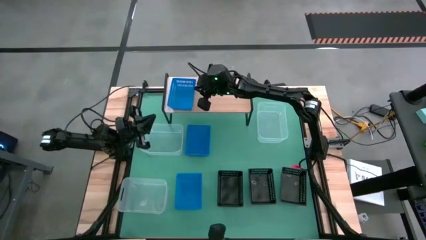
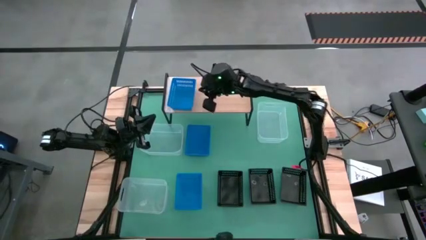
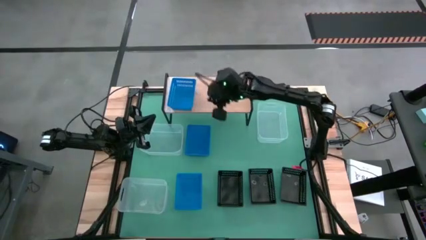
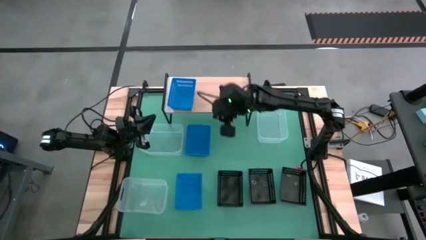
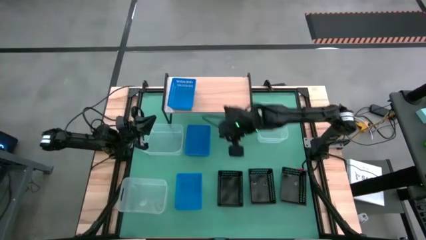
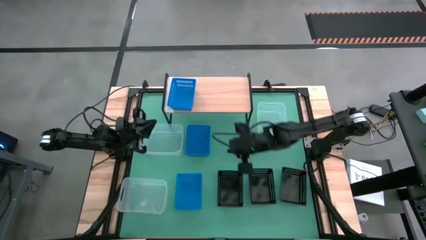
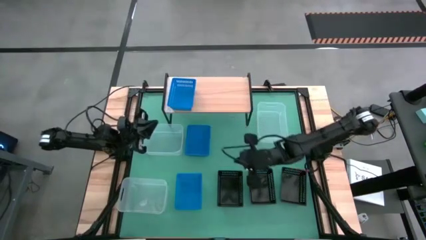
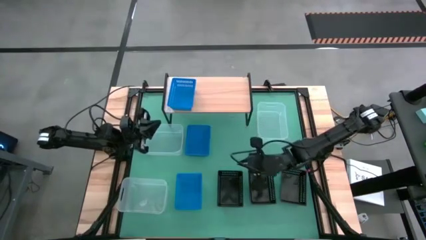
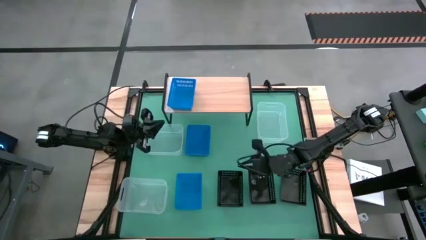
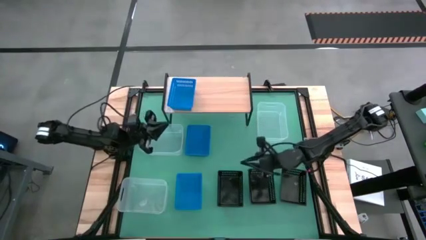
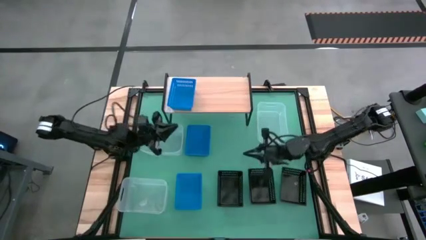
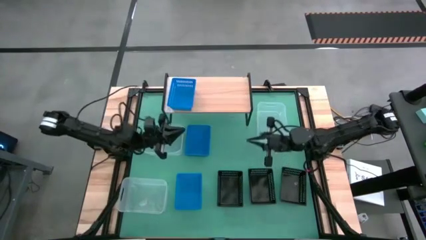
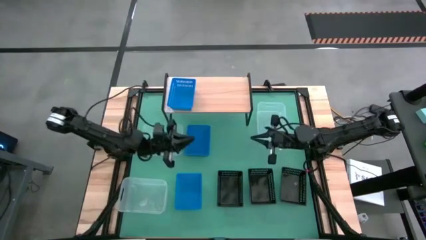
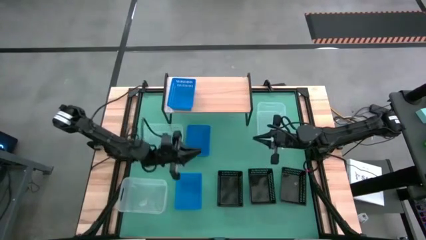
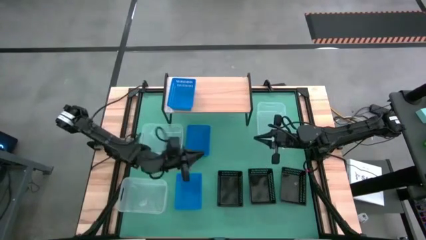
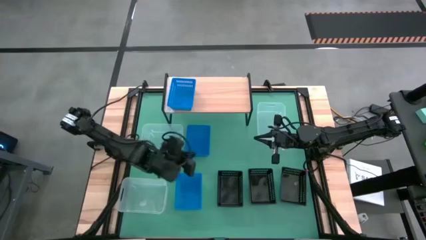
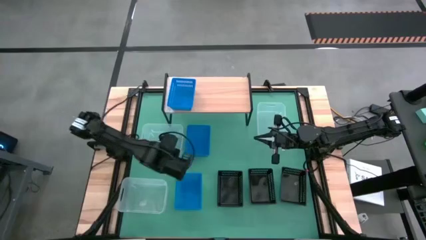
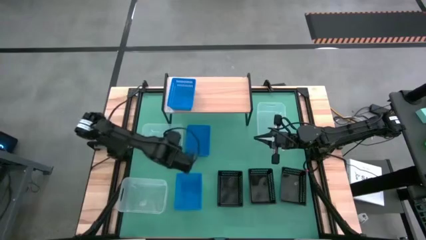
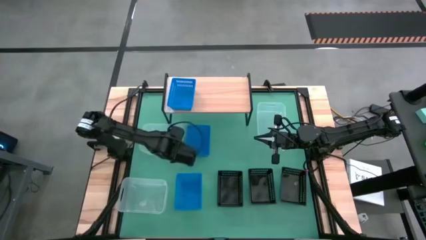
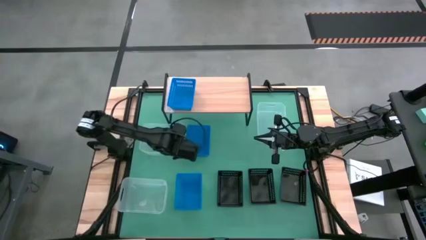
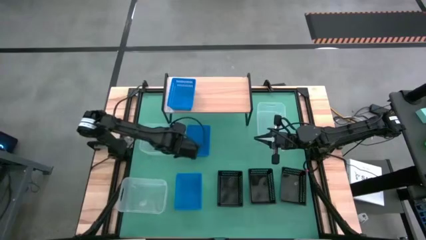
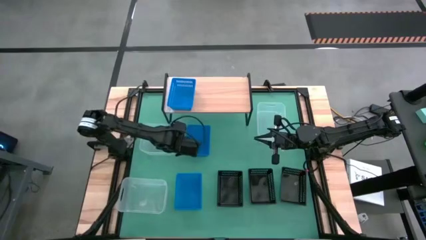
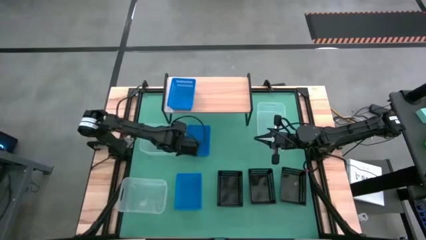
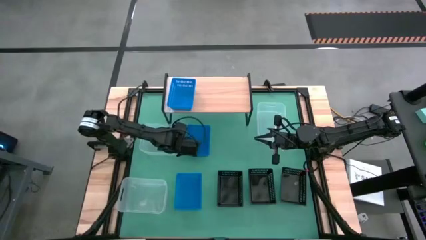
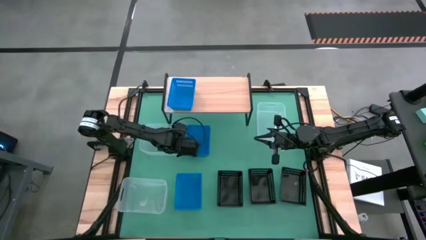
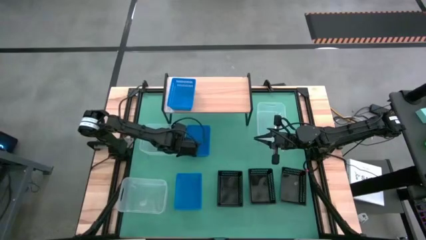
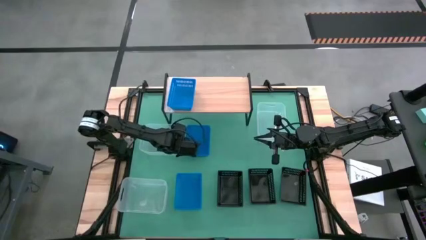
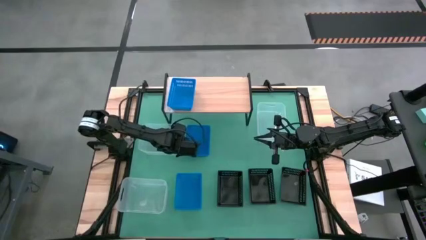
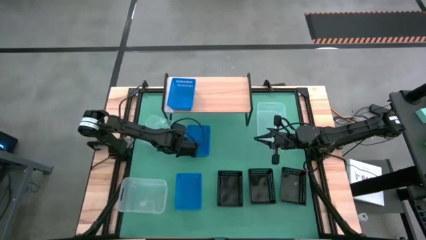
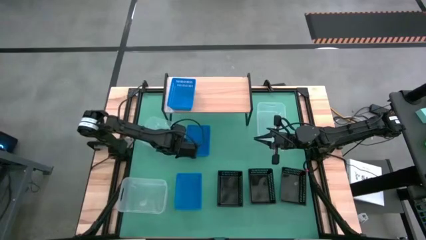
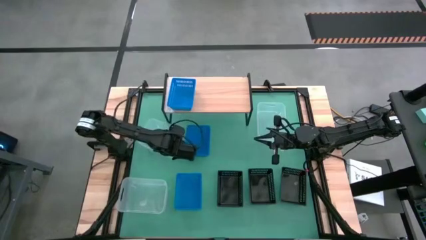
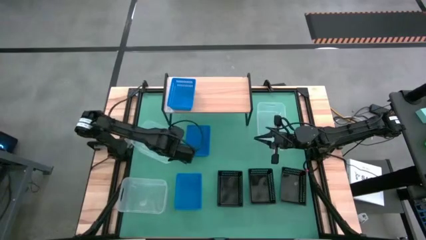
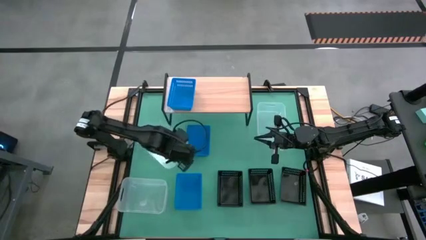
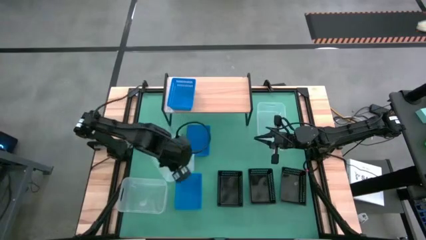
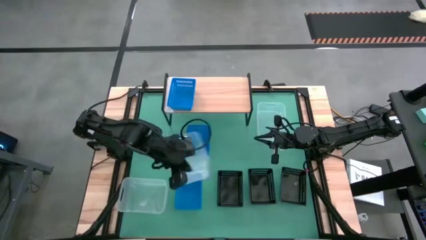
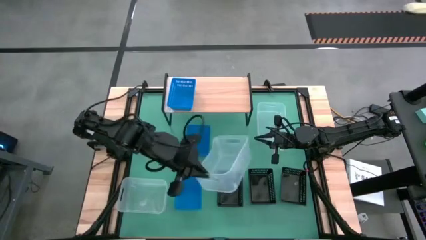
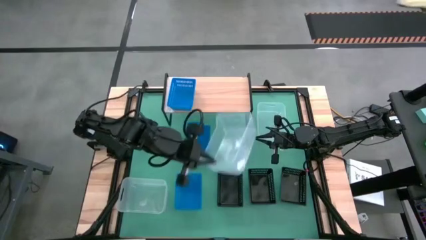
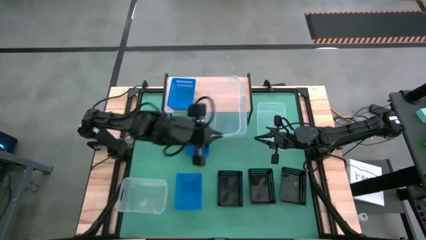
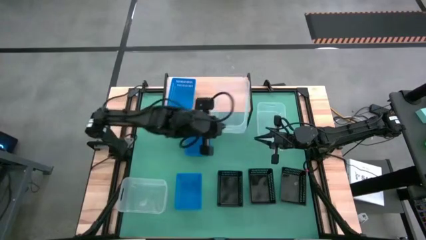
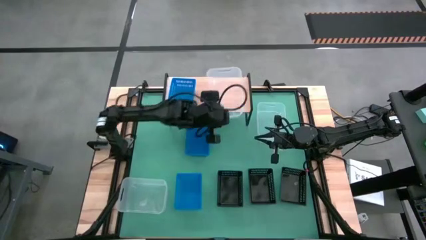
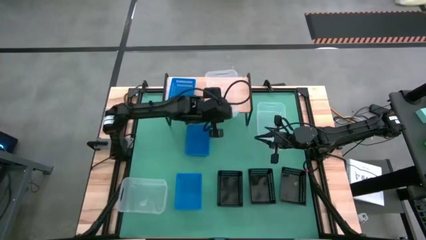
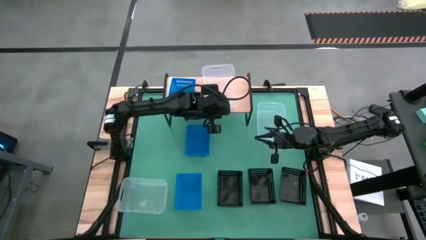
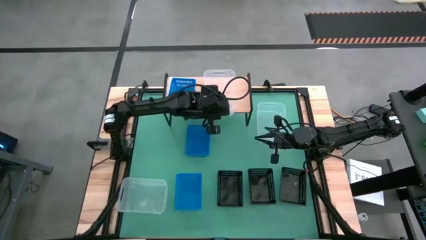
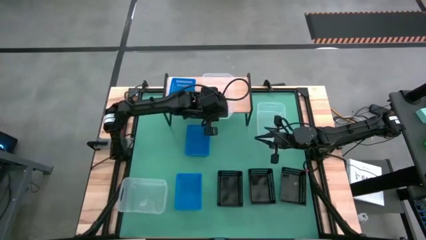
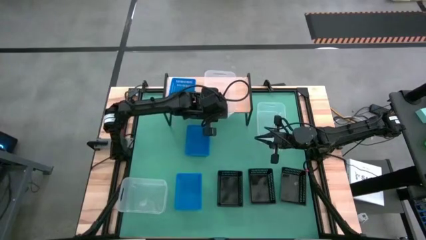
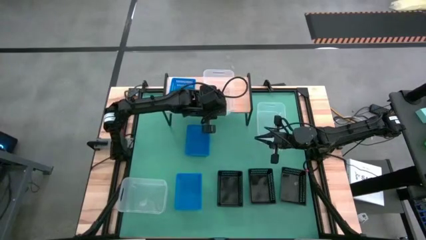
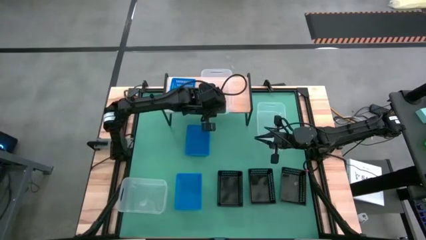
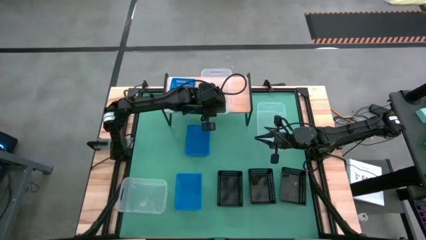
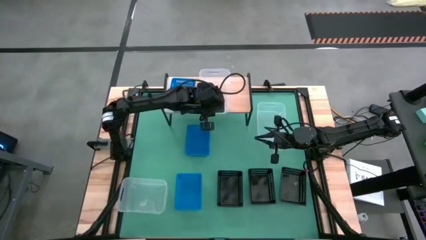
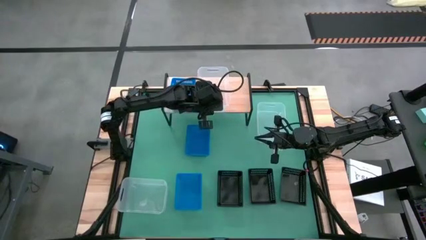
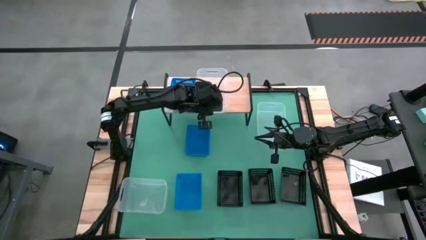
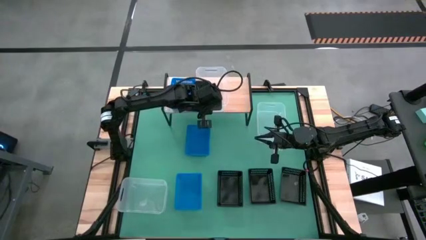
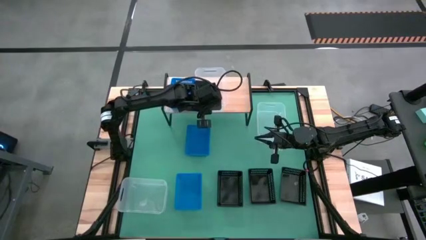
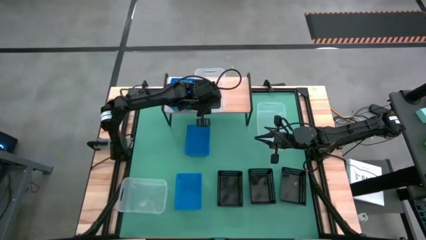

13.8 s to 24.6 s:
Task: Stack baskets on shelf by color
Put the middle left transparent bin on the shelf

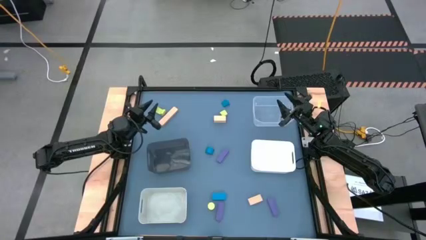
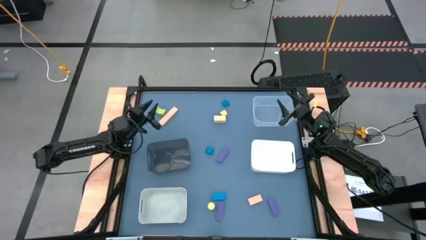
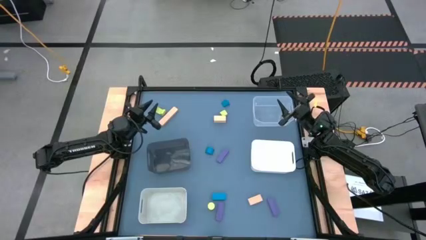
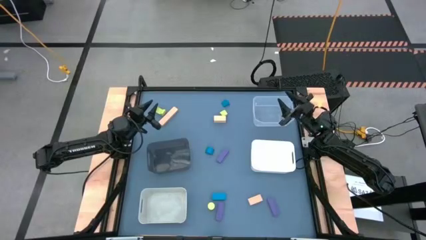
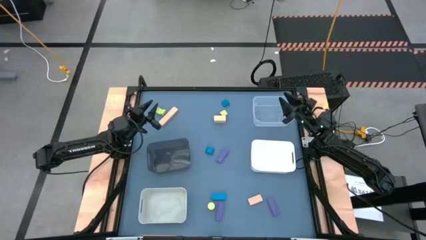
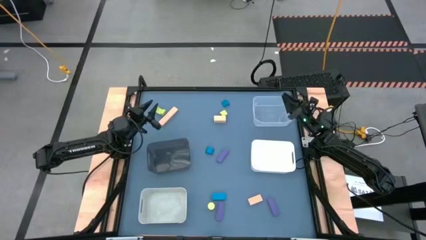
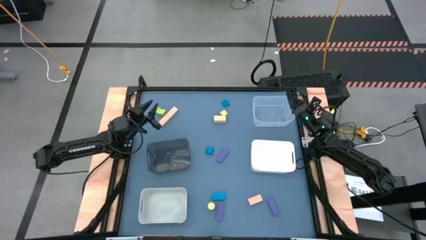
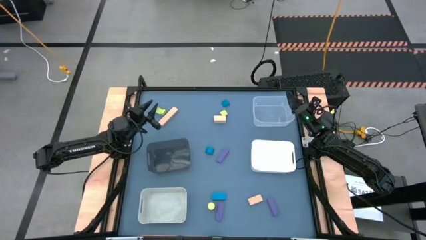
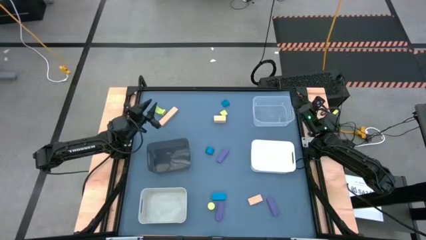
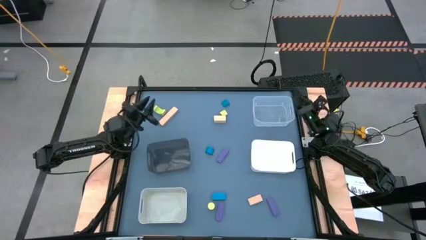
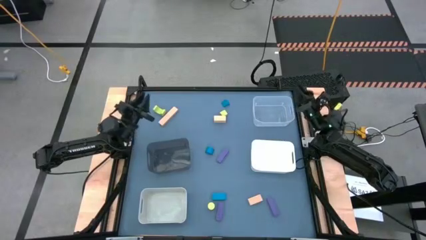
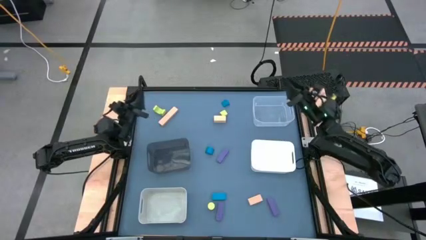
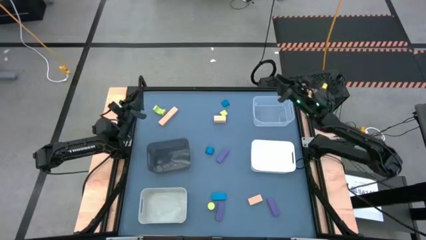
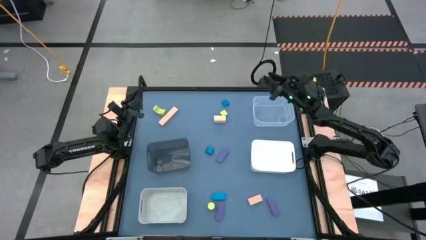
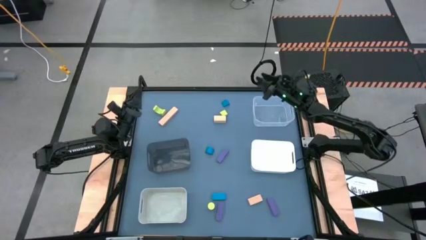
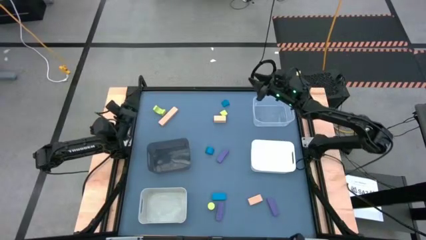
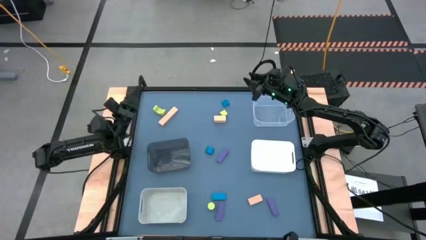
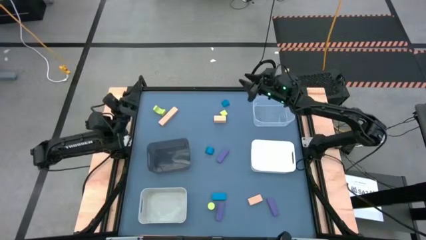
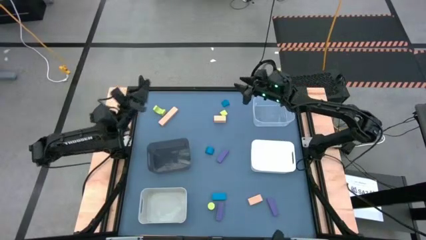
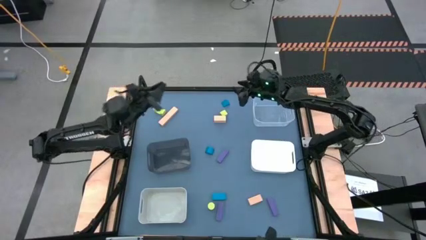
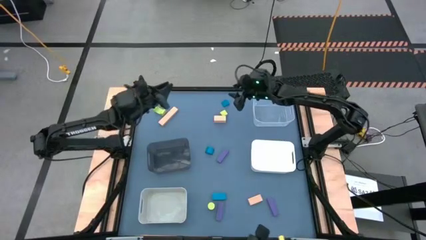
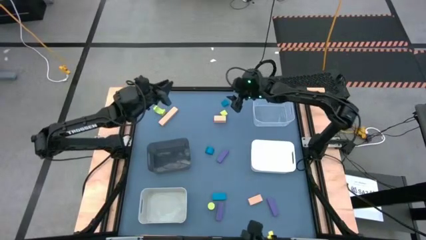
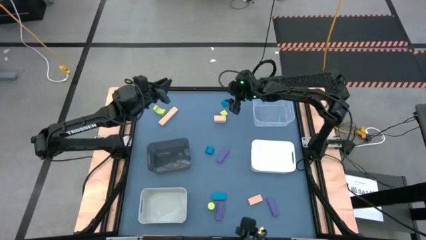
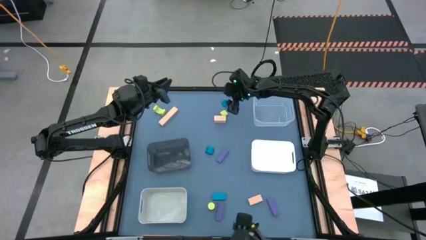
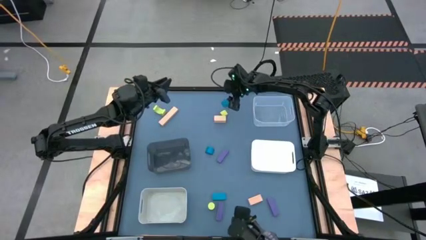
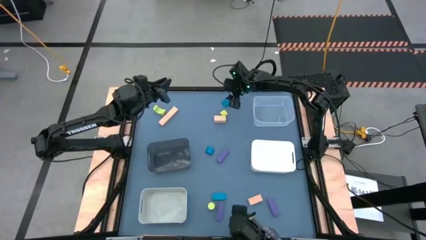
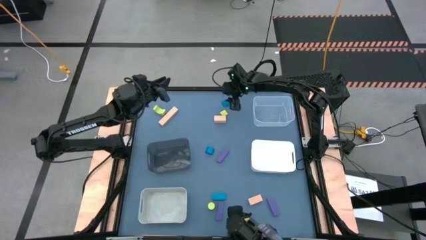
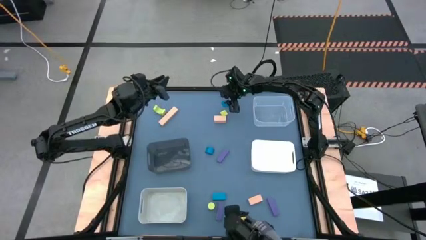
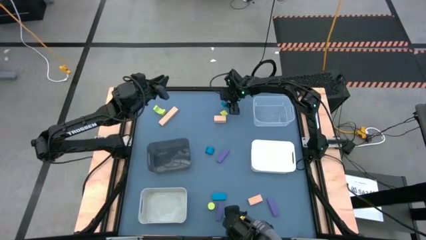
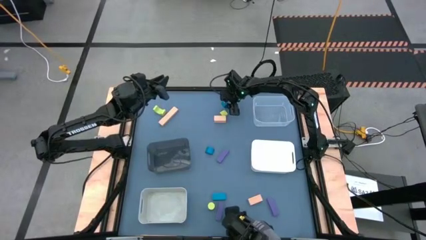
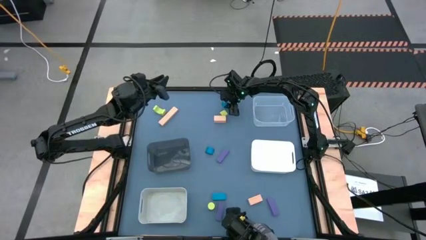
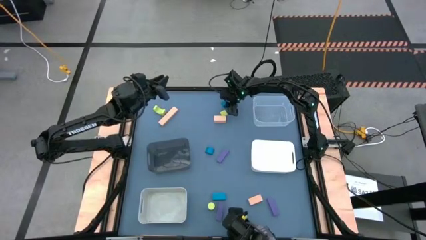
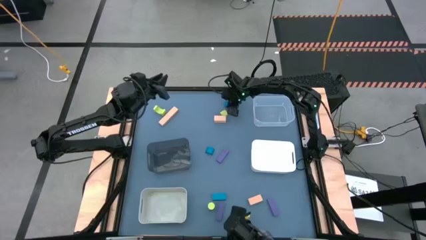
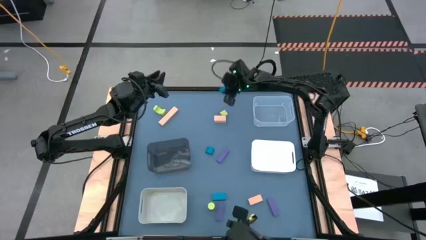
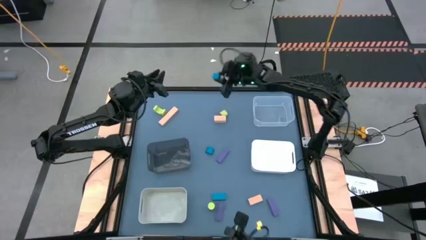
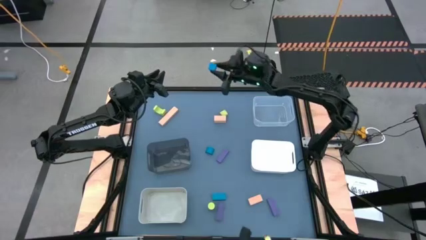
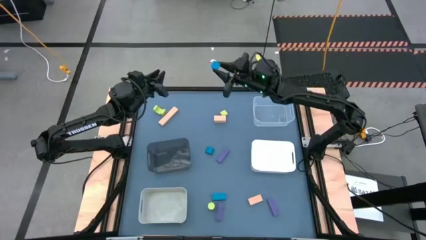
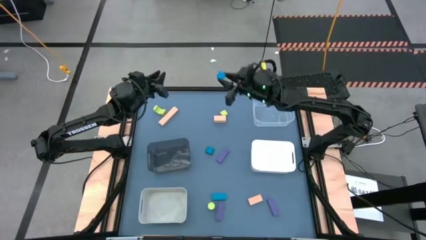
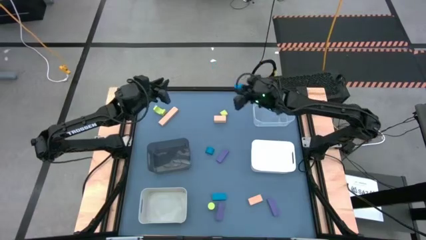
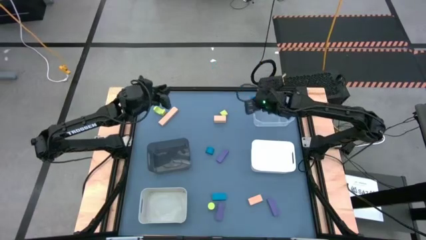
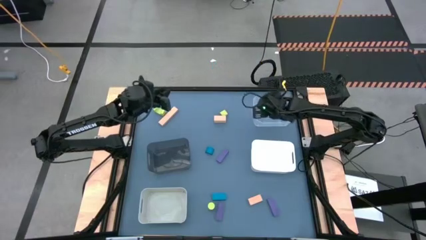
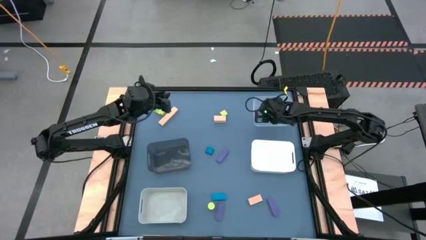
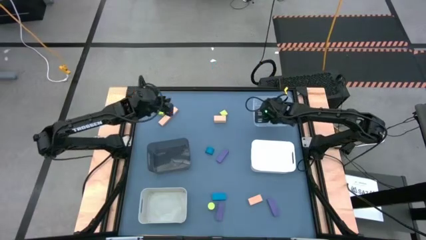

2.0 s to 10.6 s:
Task: Sort & place blocks by color
Put the top blue block into the transparent bin
